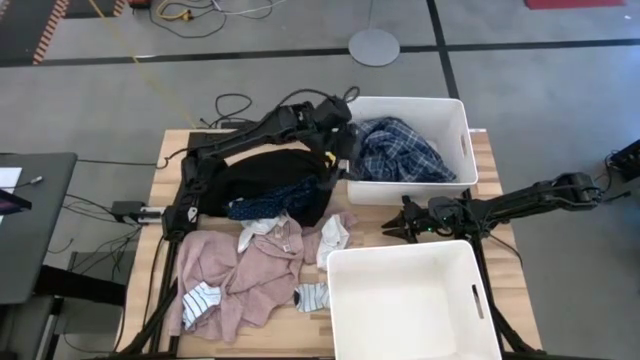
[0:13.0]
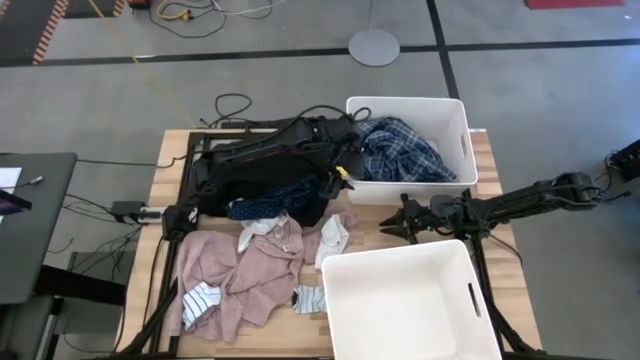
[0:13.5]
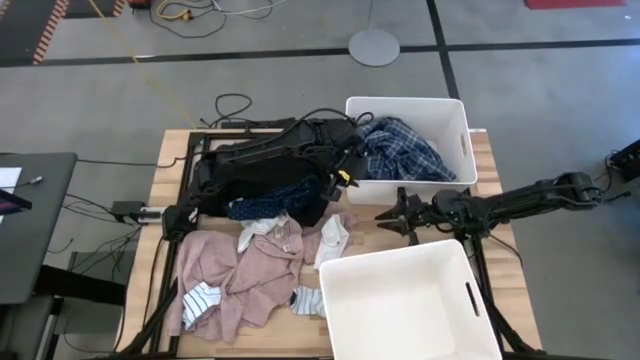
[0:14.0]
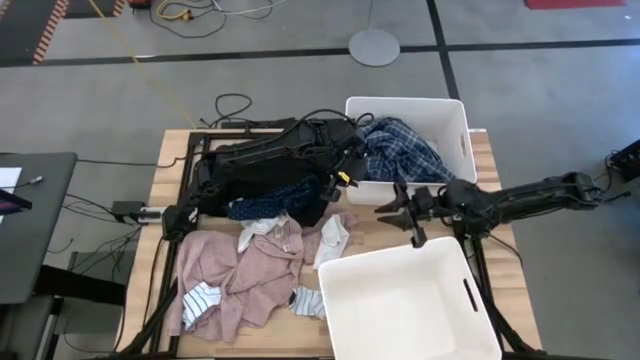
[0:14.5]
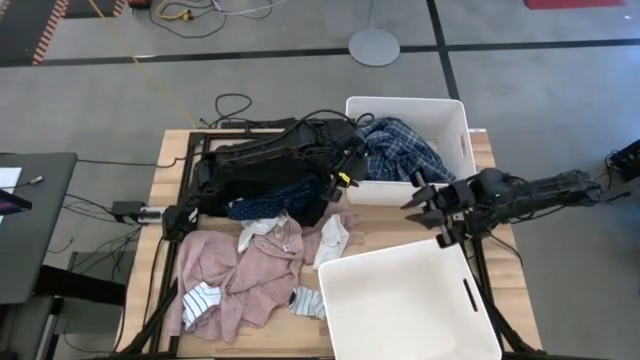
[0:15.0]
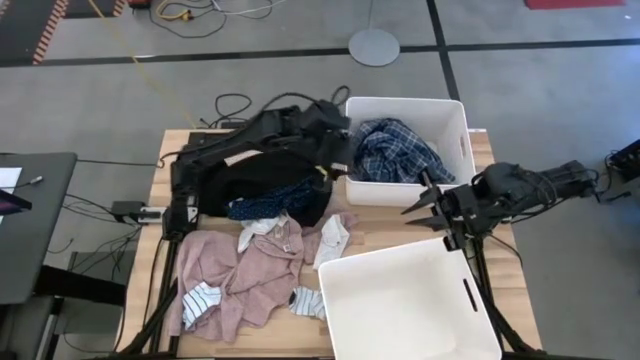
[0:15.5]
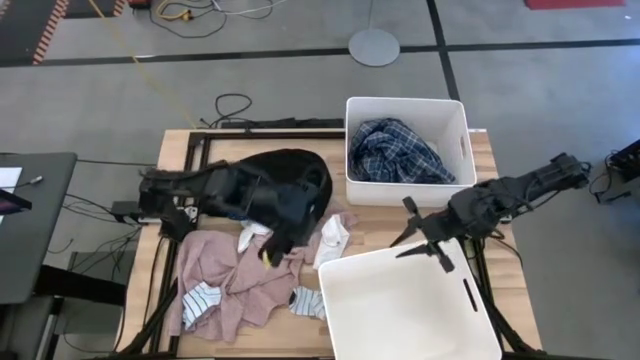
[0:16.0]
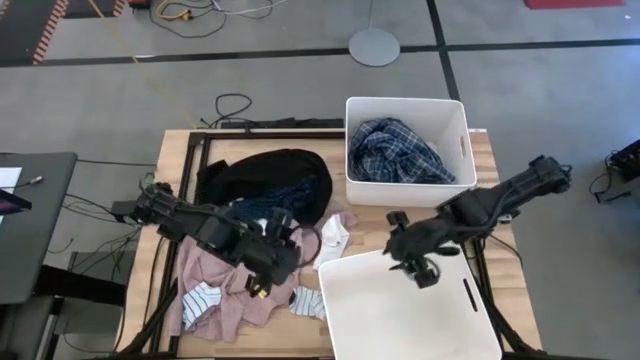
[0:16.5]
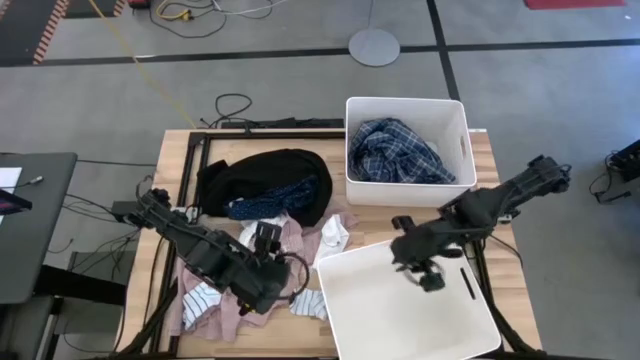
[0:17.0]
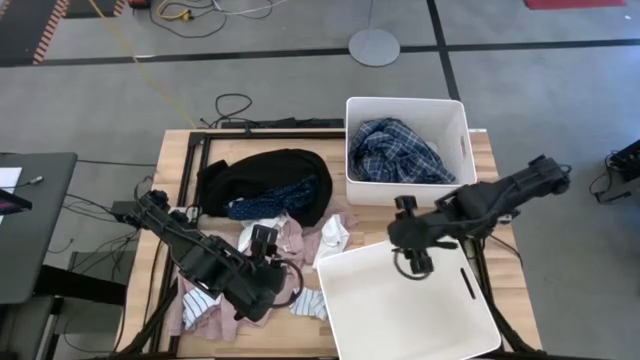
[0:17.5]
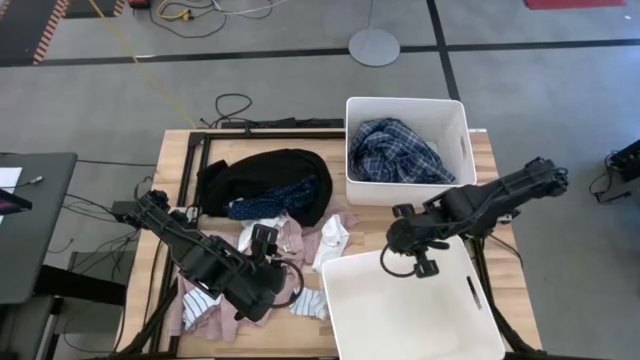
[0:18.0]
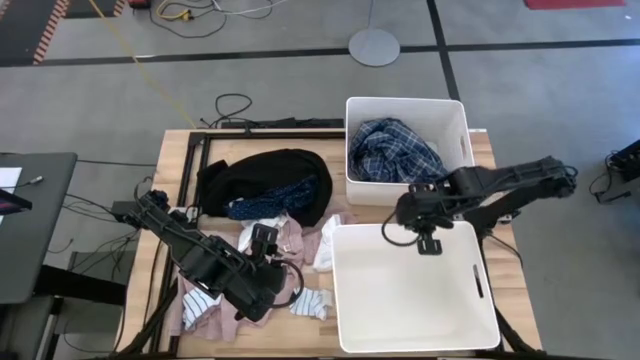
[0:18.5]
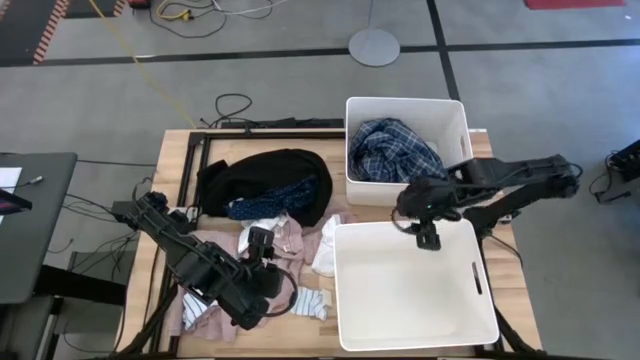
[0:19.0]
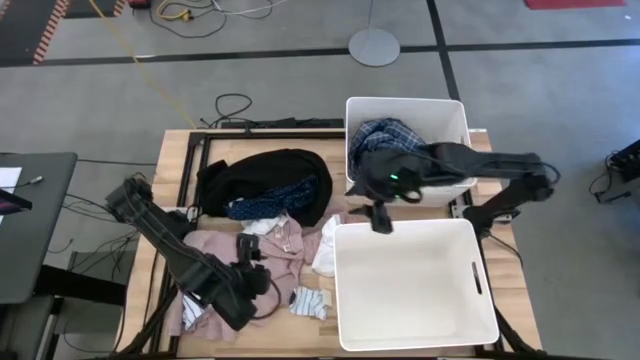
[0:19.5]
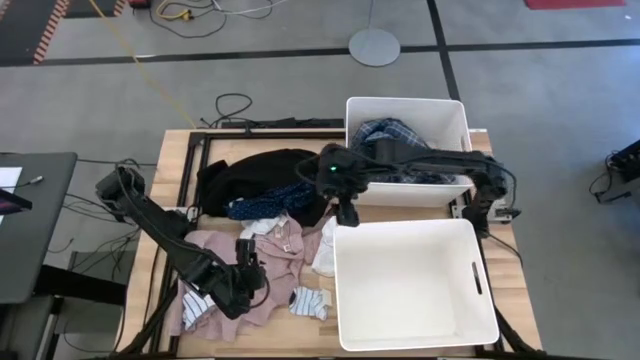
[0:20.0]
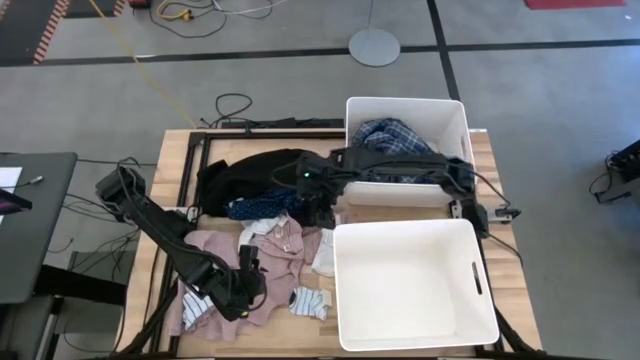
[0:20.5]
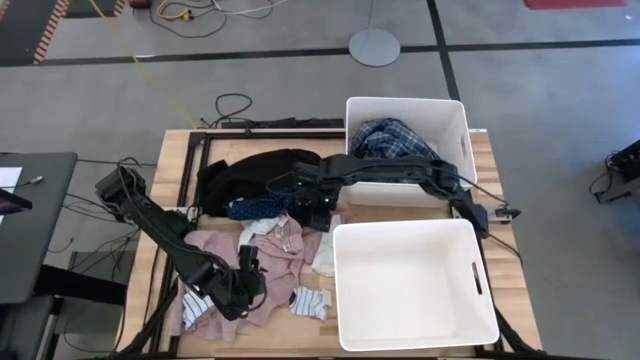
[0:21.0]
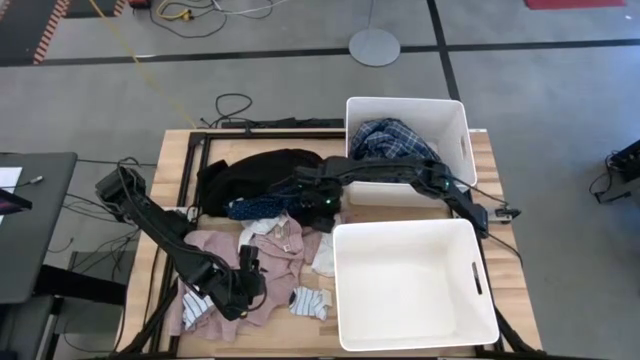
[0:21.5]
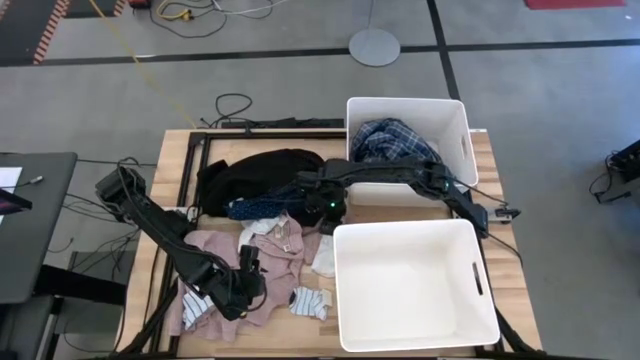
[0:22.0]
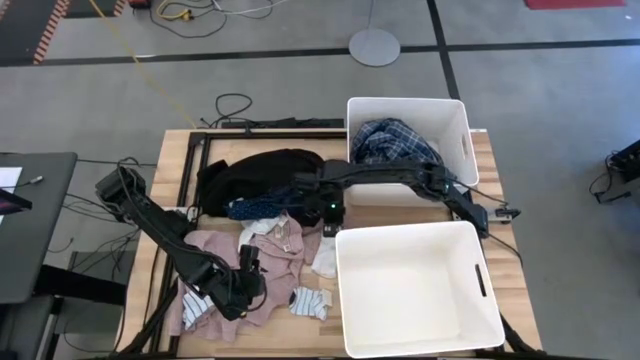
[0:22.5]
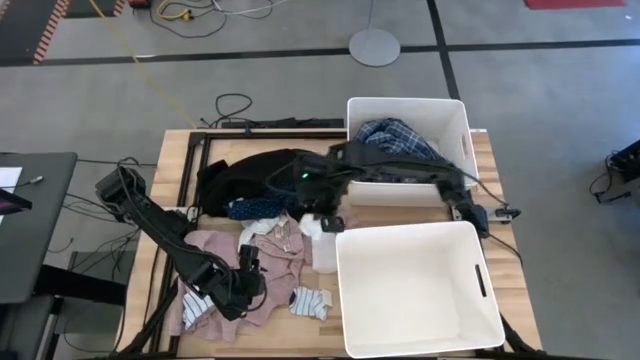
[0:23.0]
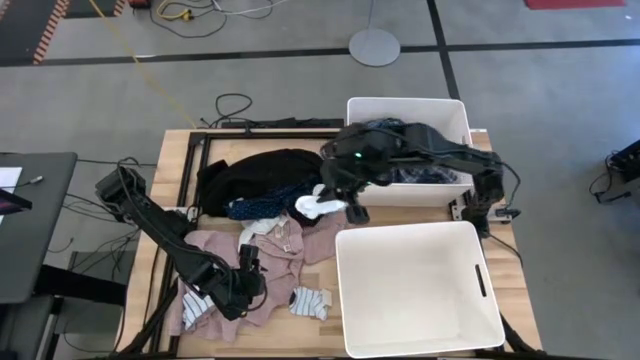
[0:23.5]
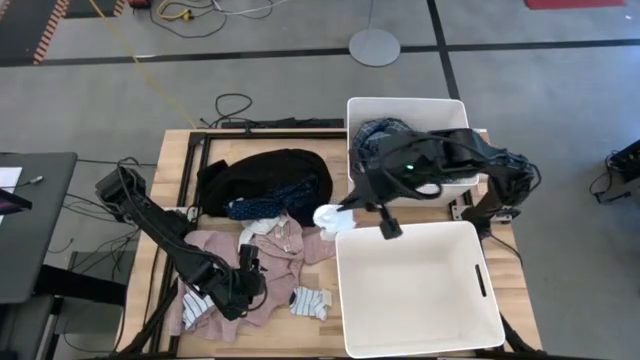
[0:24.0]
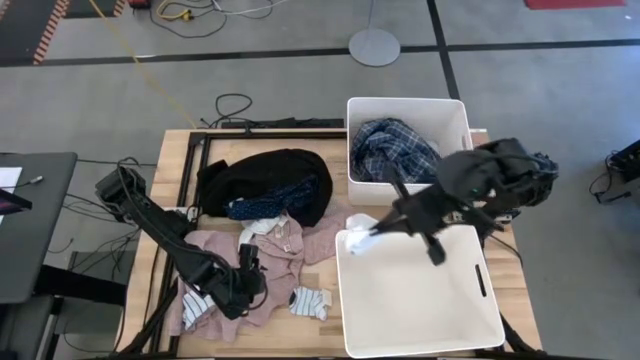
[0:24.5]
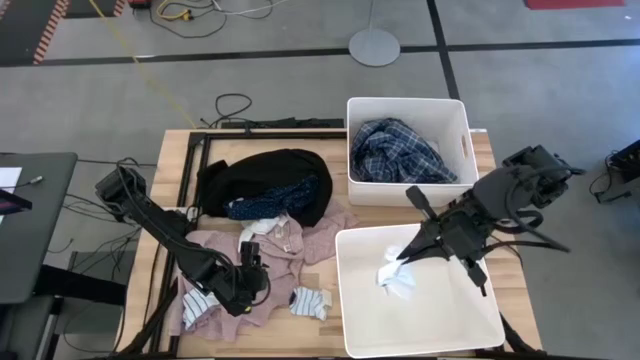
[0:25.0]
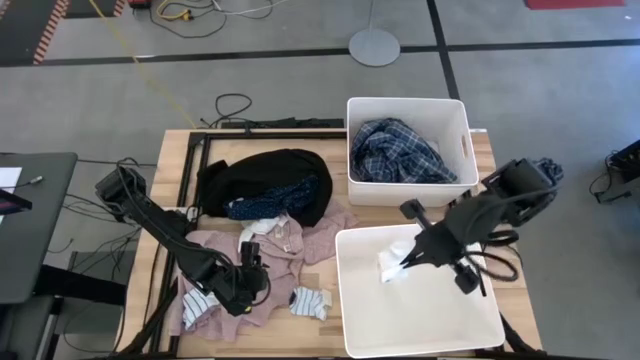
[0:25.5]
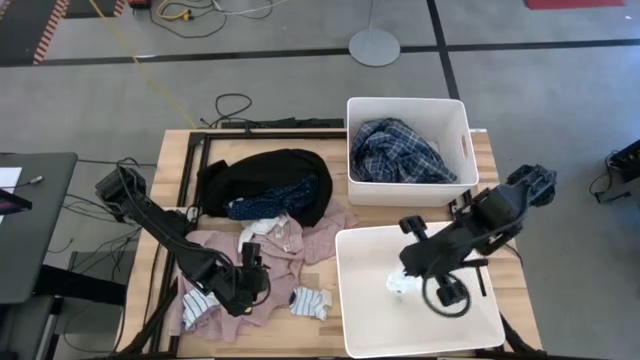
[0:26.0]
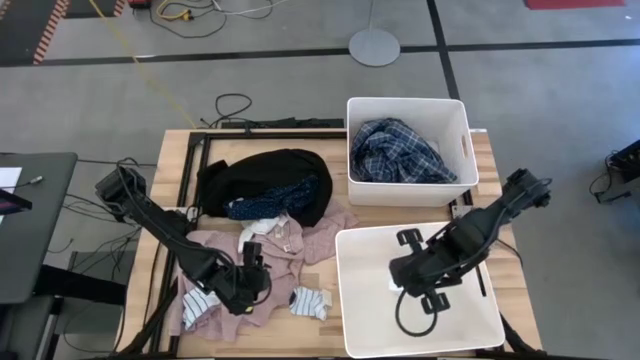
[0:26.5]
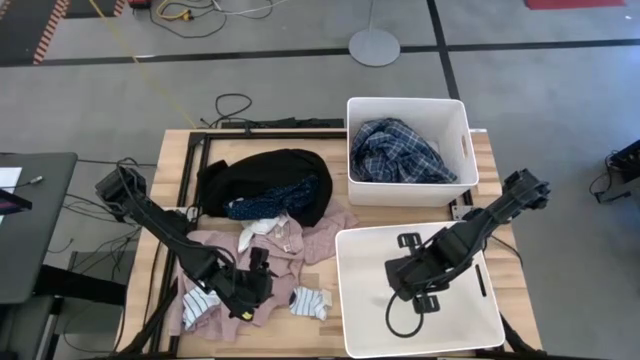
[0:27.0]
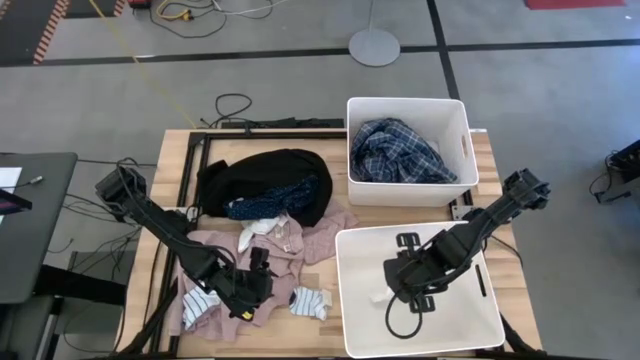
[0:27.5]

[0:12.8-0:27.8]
Task: Sort clothes
Put the white sock into the bottom white laundry bin

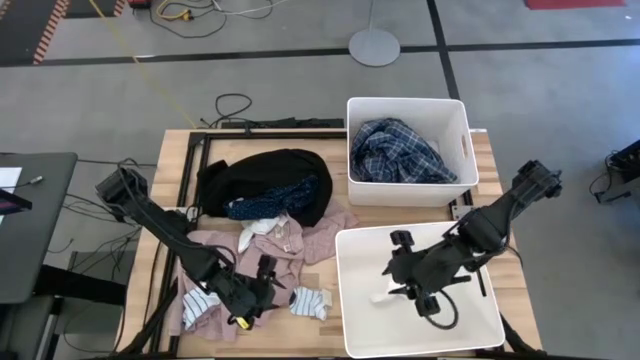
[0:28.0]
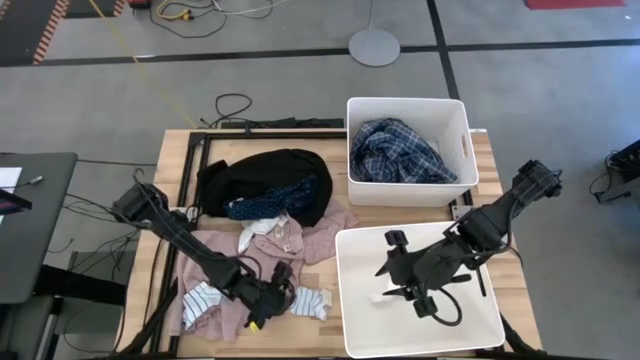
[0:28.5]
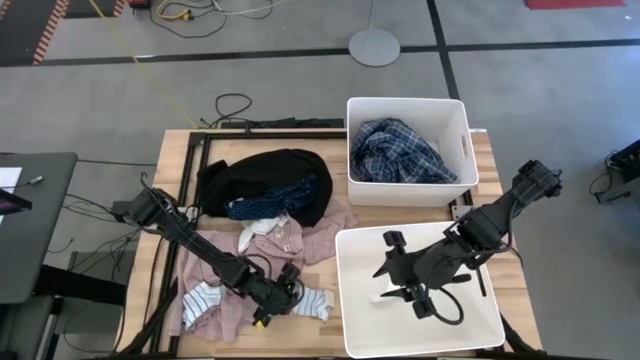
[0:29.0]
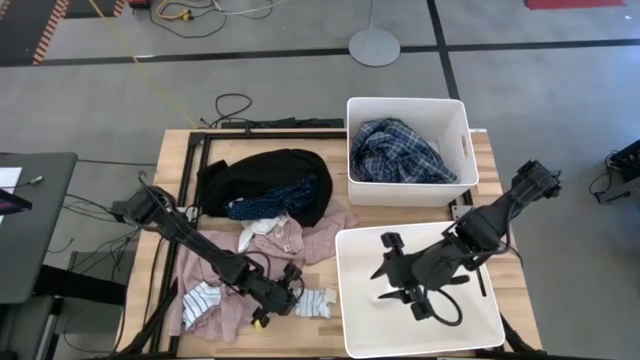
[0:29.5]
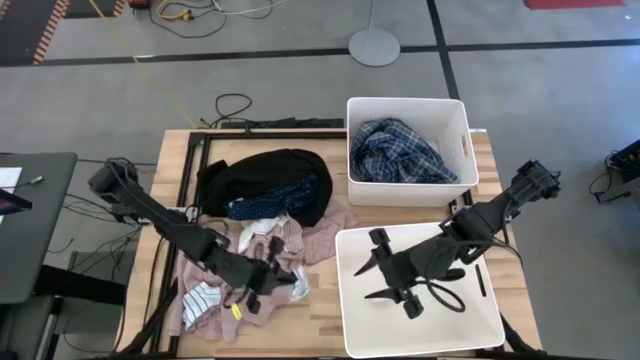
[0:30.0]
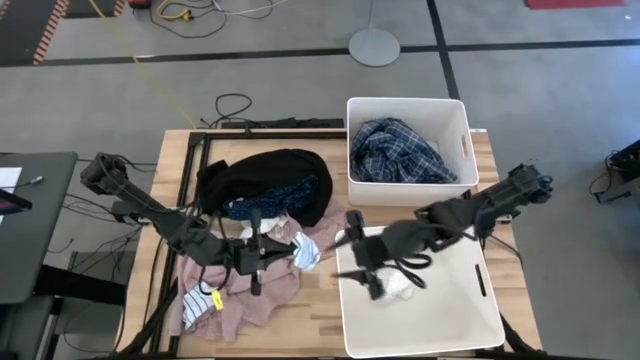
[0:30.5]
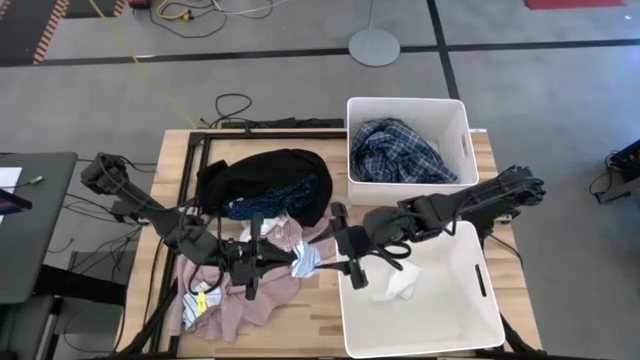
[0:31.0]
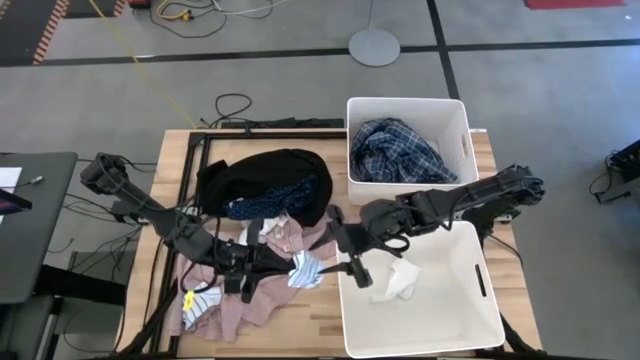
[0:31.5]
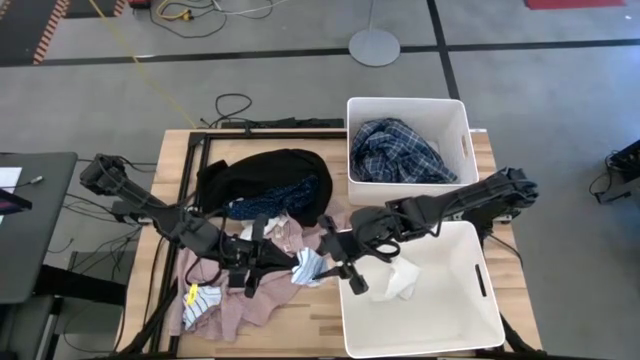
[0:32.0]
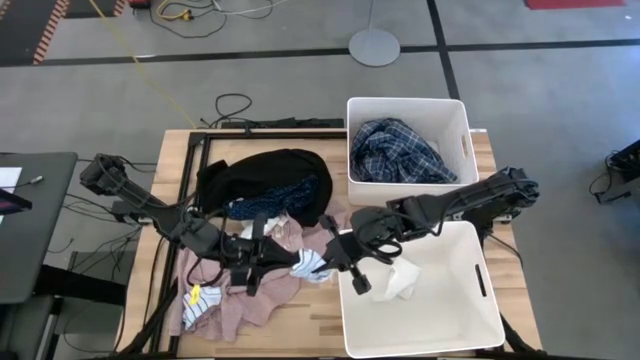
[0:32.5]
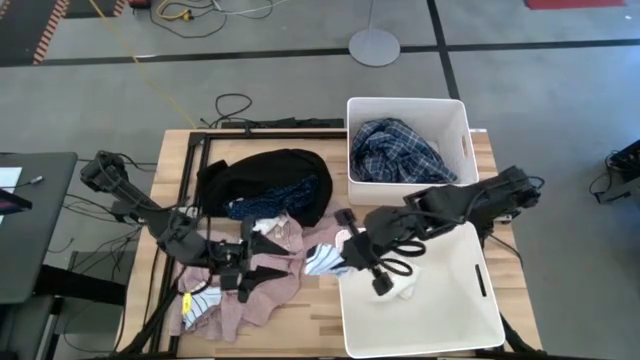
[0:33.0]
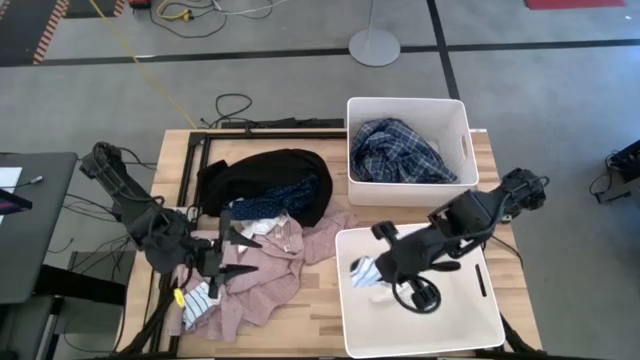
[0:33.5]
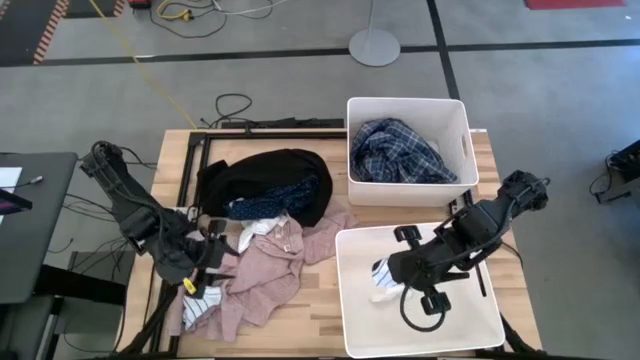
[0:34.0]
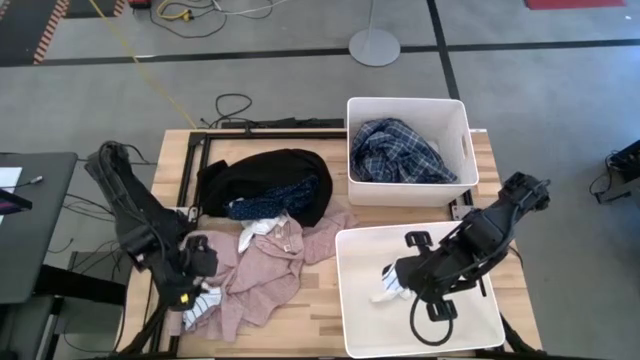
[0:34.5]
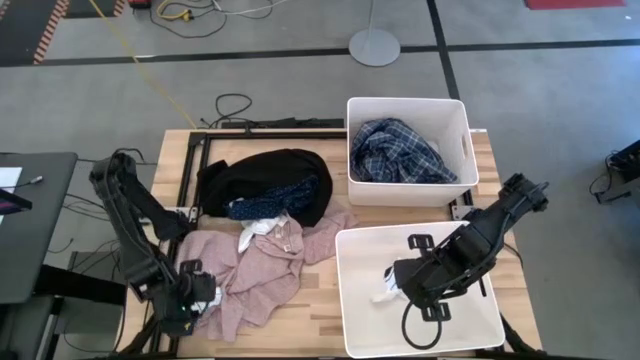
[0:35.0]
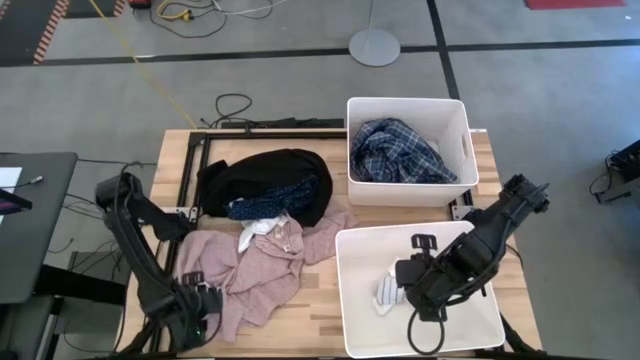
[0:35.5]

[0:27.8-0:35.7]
Put the right striped white sock into the bottom white laundry bin
